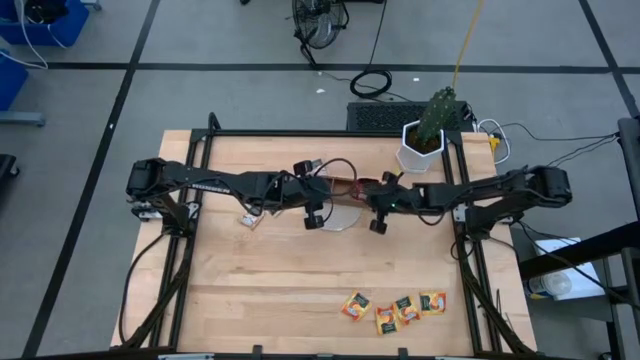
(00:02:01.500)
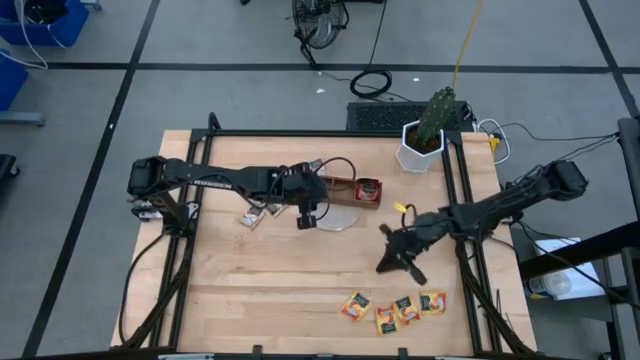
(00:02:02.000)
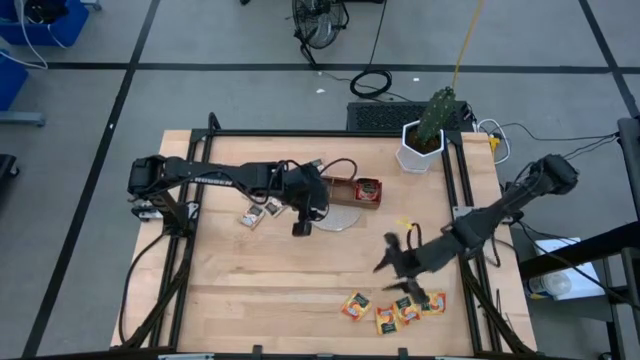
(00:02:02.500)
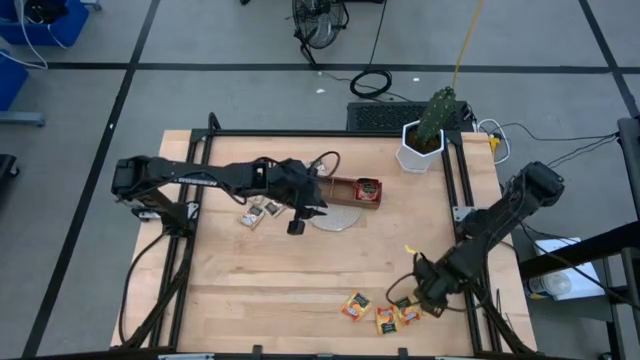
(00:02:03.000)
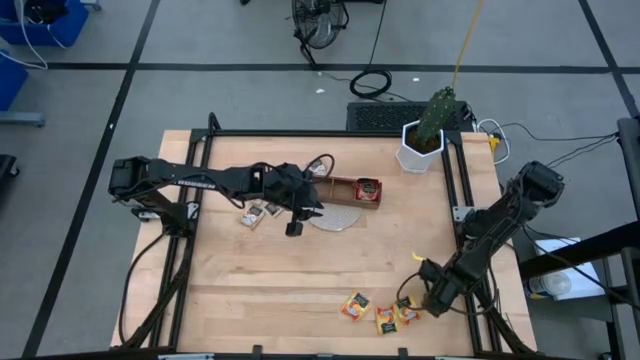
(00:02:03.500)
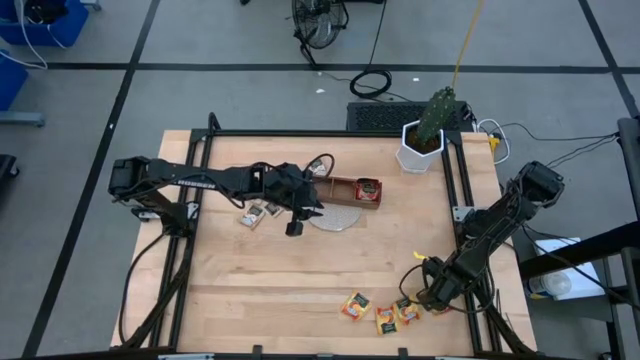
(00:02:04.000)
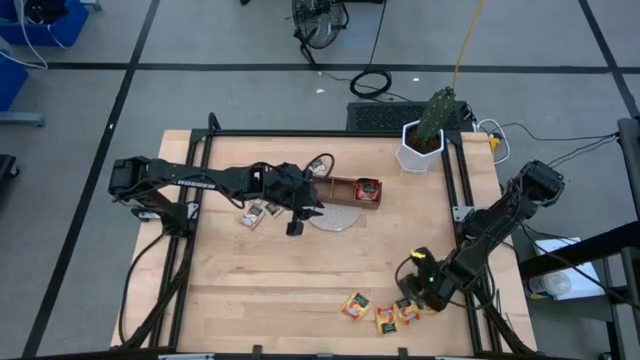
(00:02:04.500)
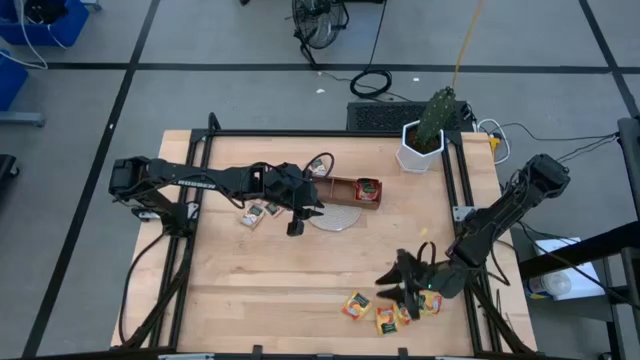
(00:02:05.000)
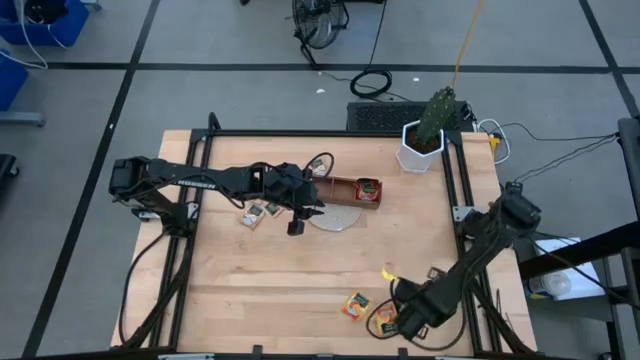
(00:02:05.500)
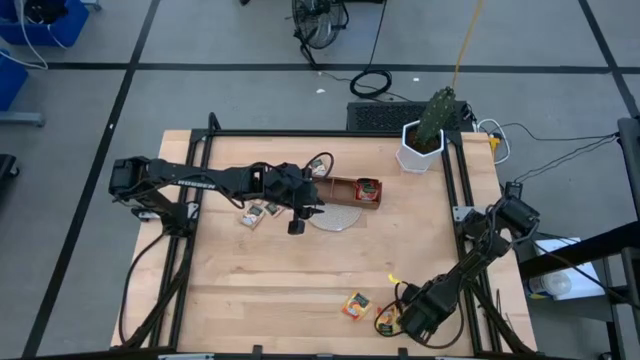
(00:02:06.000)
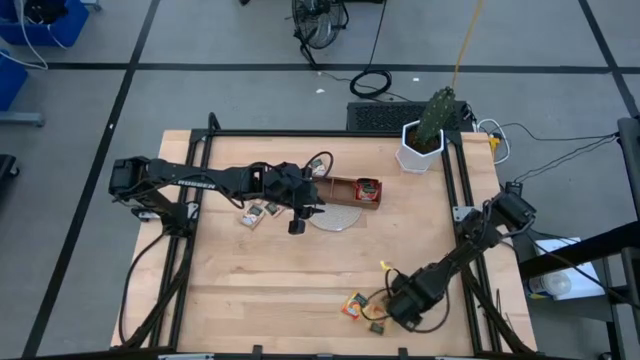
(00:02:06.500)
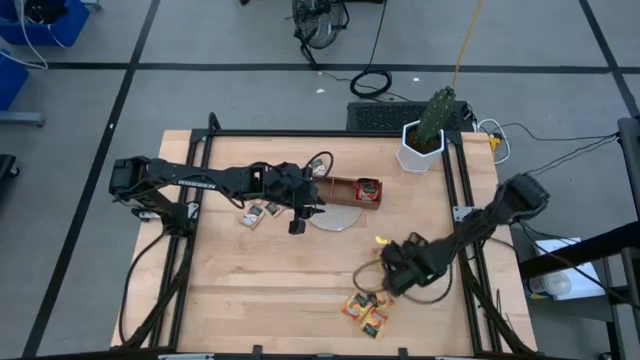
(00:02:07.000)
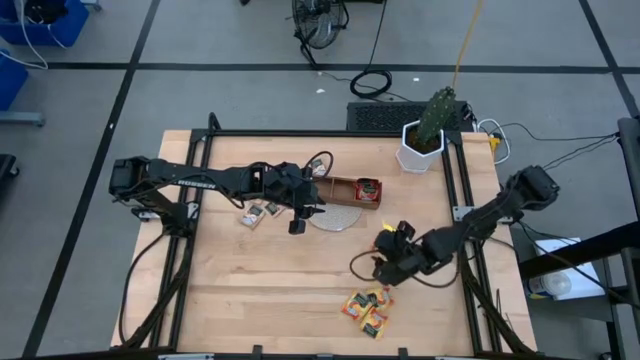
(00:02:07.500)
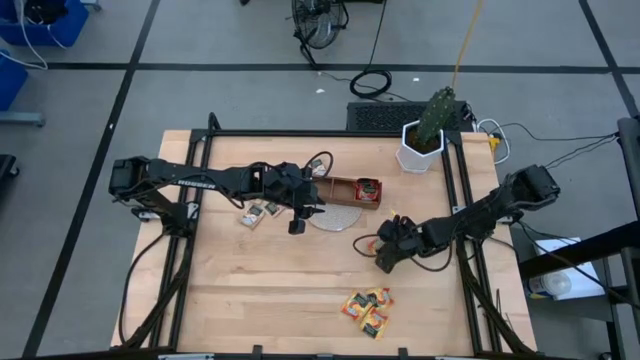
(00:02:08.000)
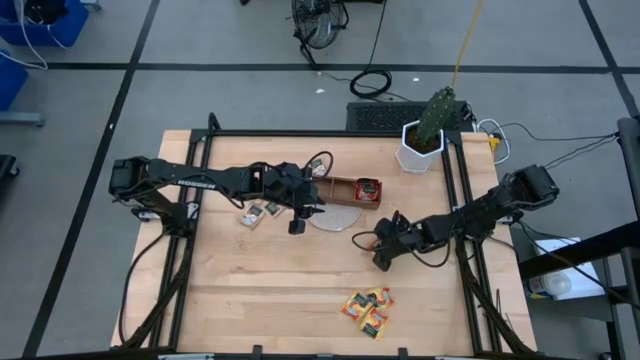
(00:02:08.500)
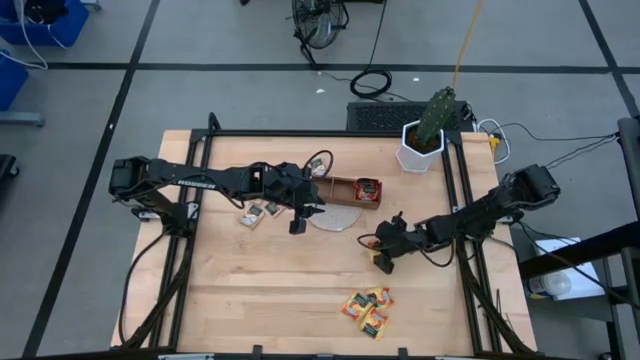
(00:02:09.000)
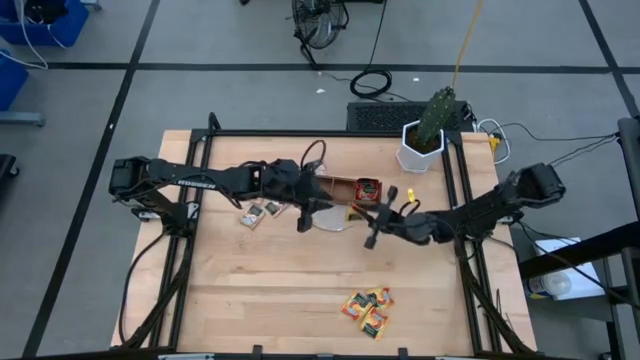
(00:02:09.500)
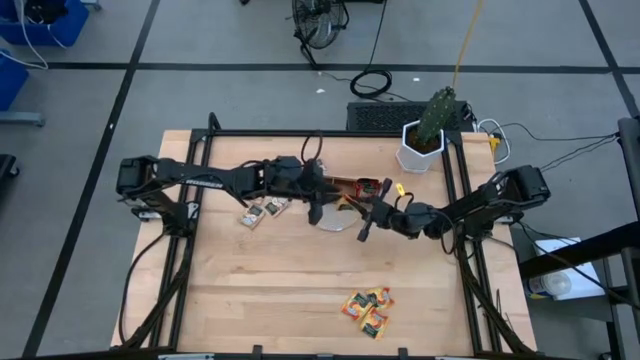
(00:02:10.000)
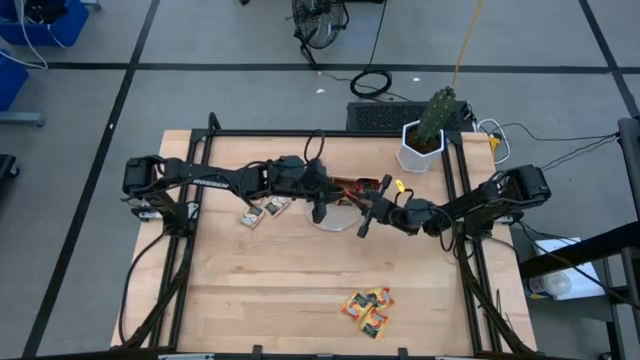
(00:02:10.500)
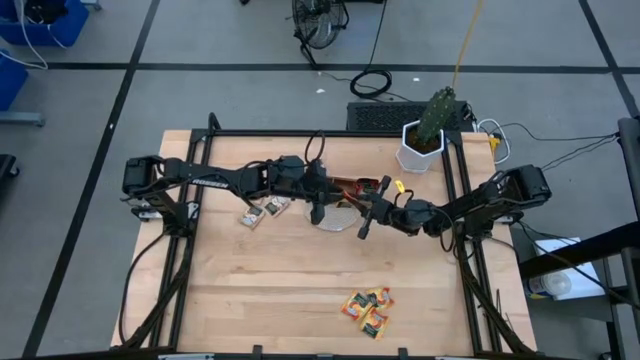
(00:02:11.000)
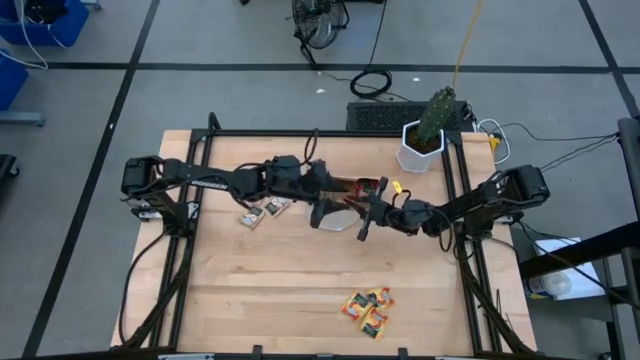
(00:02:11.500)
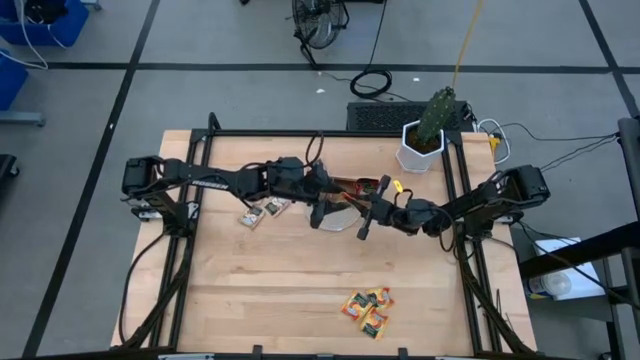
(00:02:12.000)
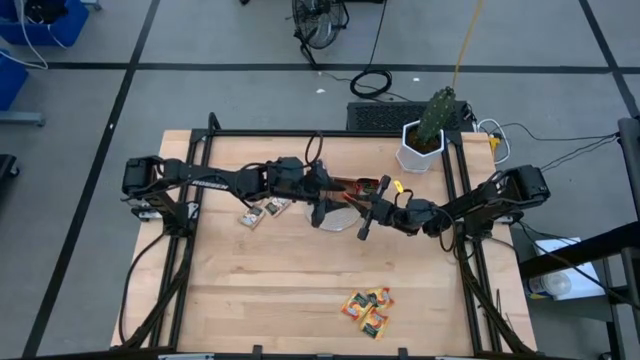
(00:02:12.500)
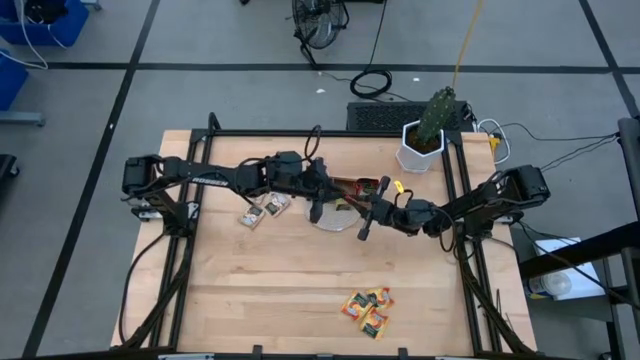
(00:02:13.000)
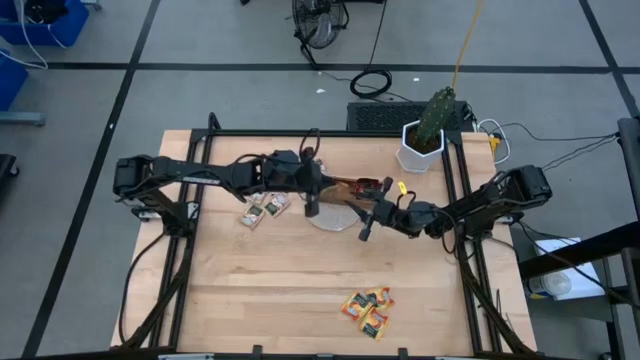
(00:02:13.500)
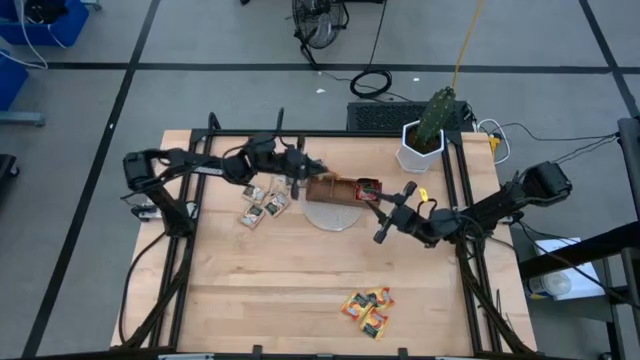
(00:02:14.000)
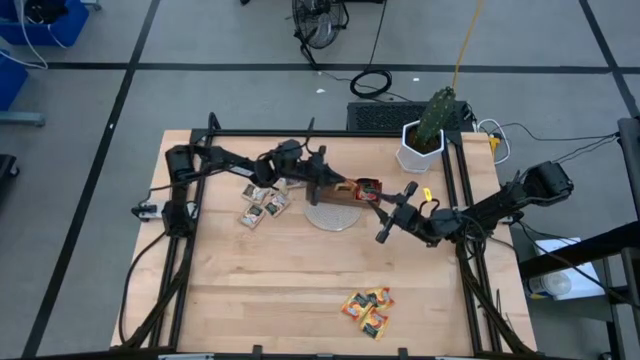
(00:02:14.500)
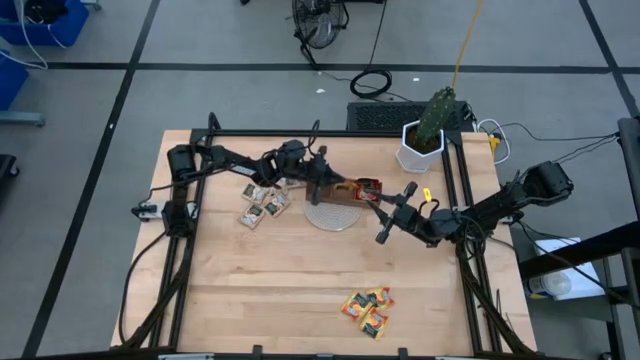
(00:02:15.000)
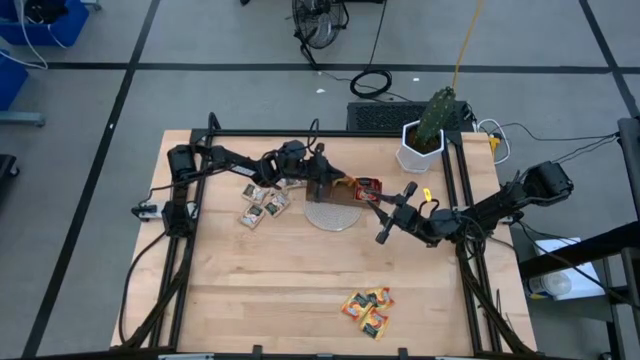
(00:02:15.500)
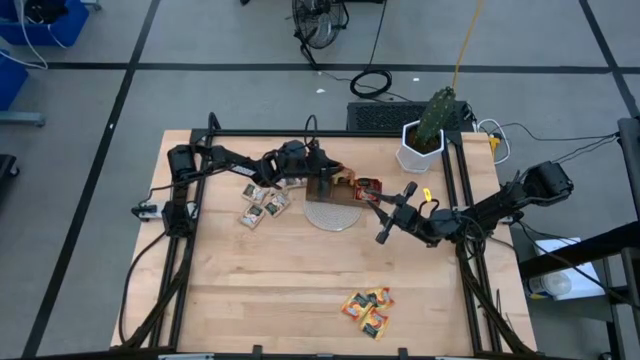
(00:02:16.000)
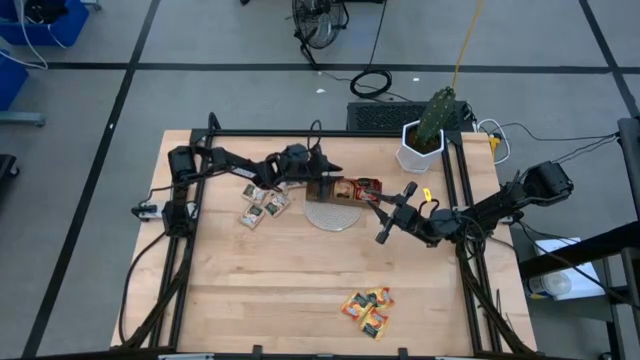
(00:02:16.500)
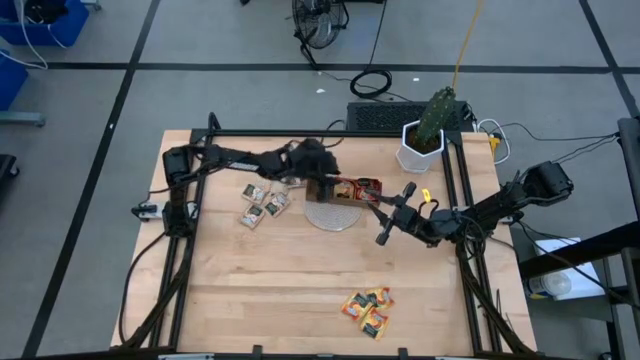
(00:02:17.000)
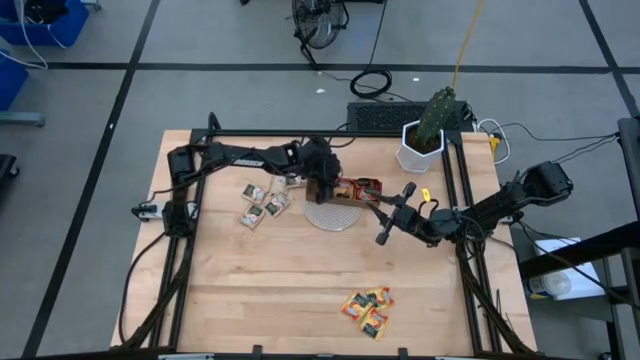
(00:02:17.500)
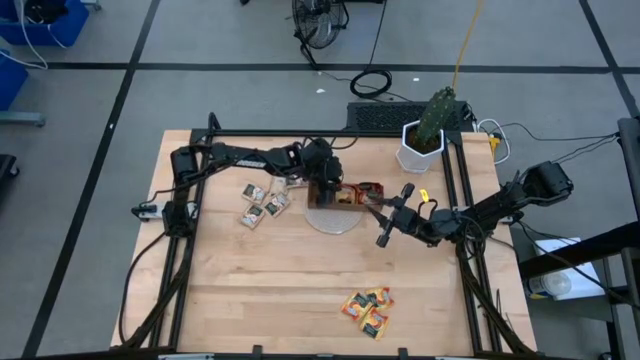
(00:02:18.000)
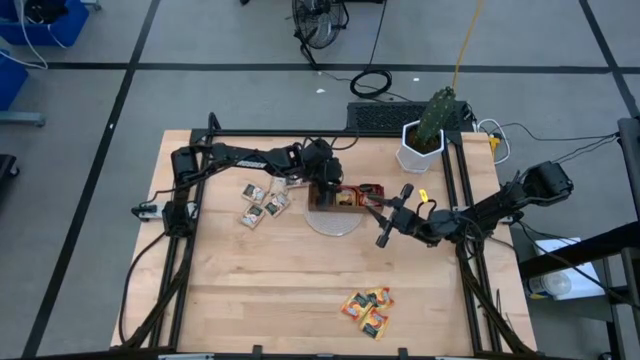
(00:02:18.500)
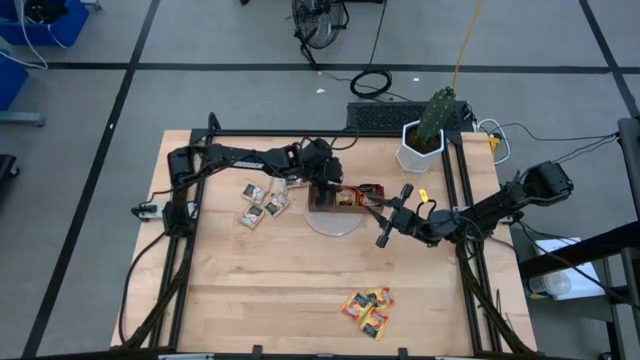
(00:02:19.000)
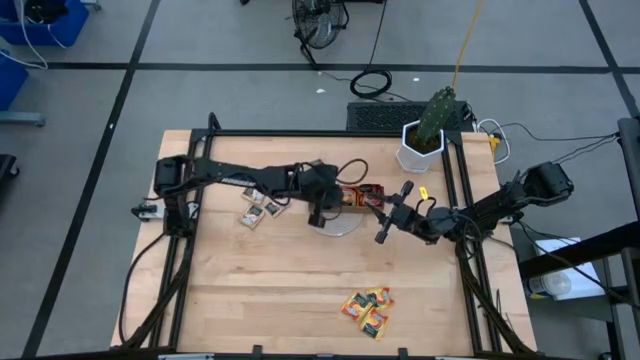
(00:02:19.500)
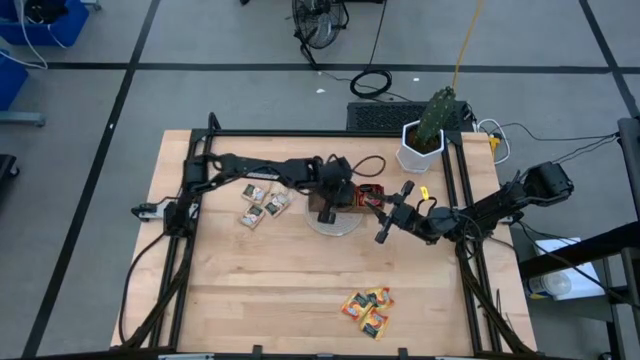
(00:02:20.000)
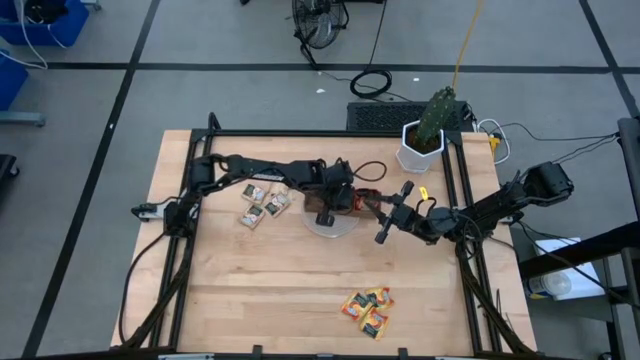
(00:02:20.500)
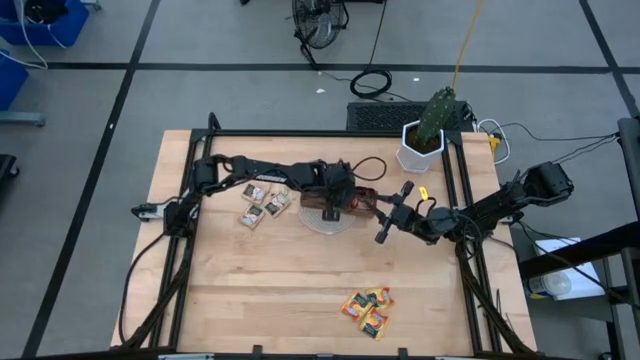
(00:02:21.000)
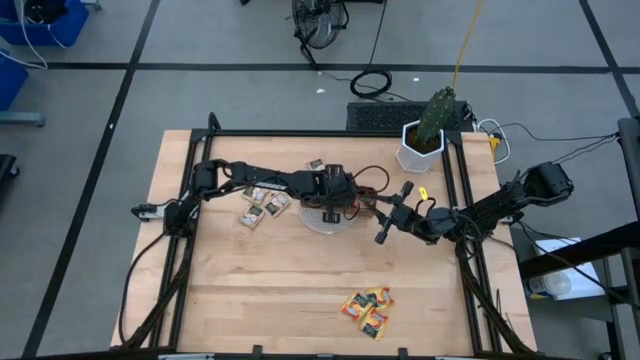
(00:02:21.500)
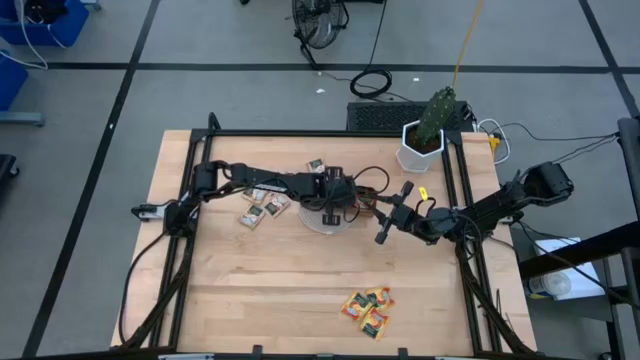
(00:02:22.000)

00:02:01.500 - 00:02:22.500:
Task: Pick & Place Tea
Put the orange tea bag into the middle section of the wood organizer
